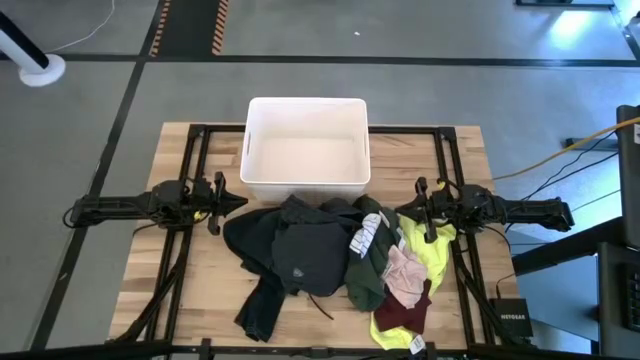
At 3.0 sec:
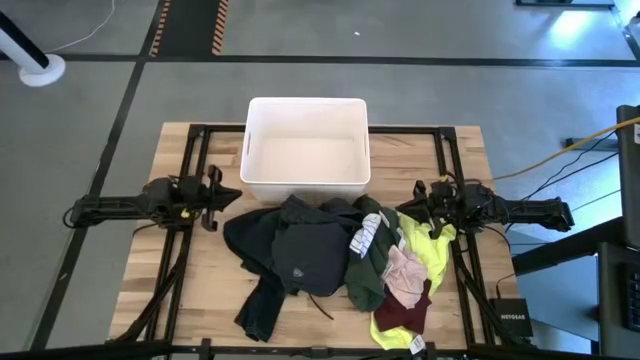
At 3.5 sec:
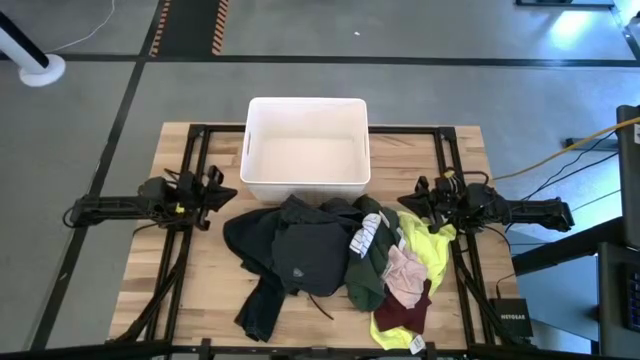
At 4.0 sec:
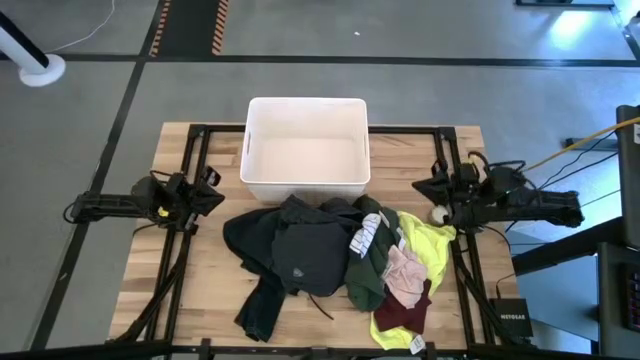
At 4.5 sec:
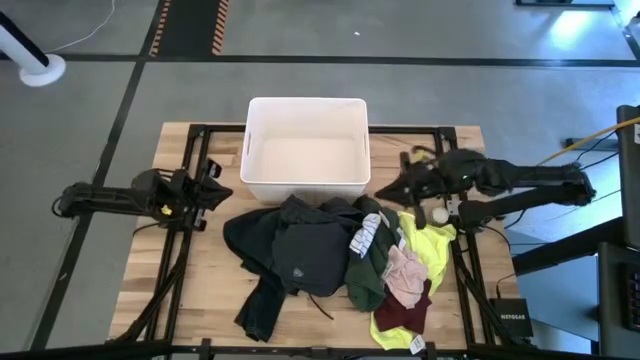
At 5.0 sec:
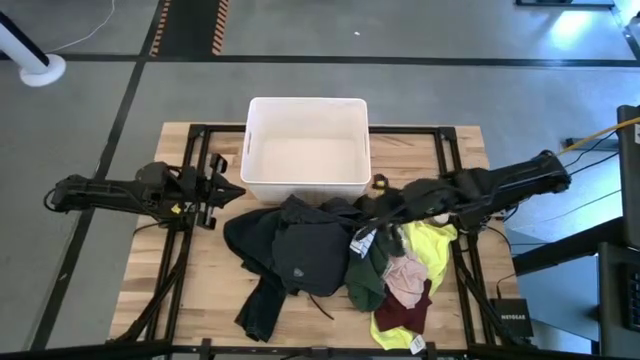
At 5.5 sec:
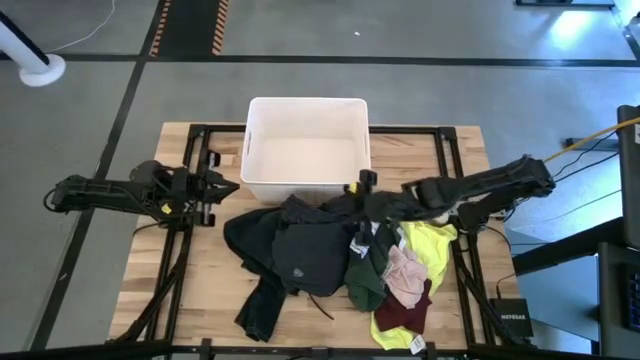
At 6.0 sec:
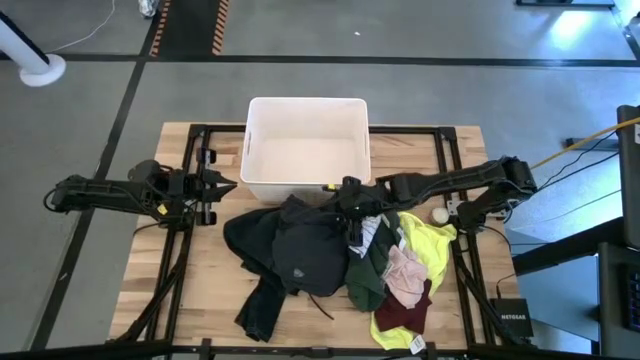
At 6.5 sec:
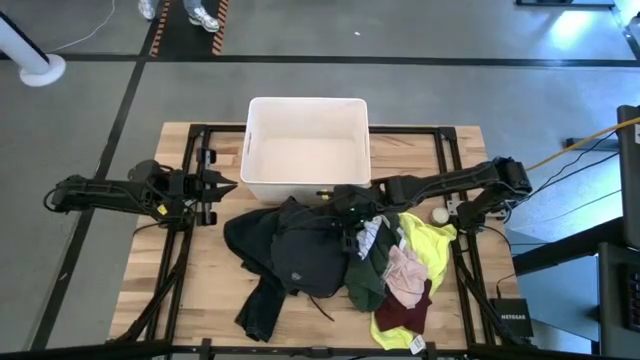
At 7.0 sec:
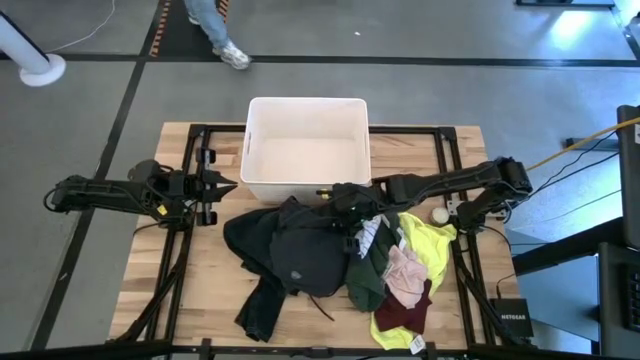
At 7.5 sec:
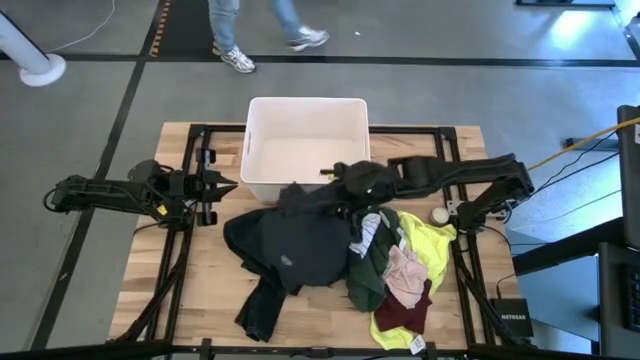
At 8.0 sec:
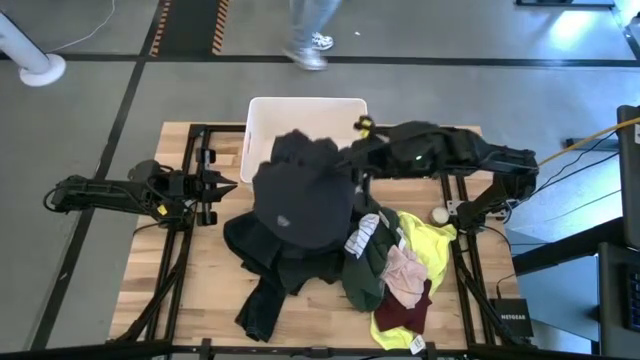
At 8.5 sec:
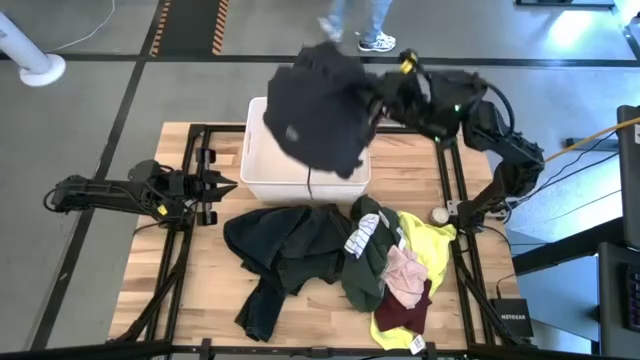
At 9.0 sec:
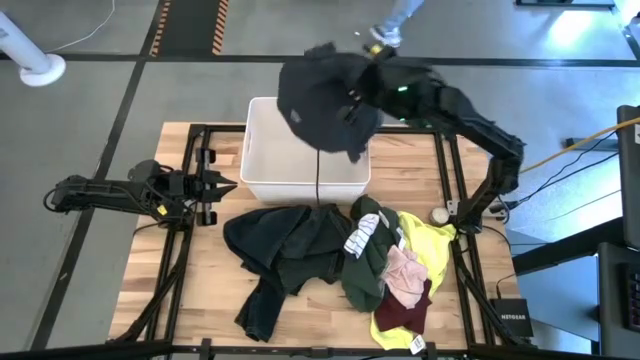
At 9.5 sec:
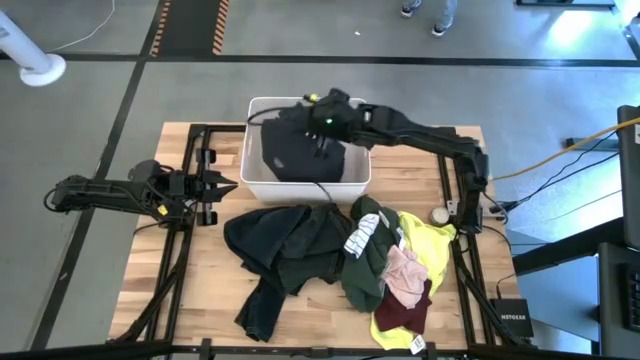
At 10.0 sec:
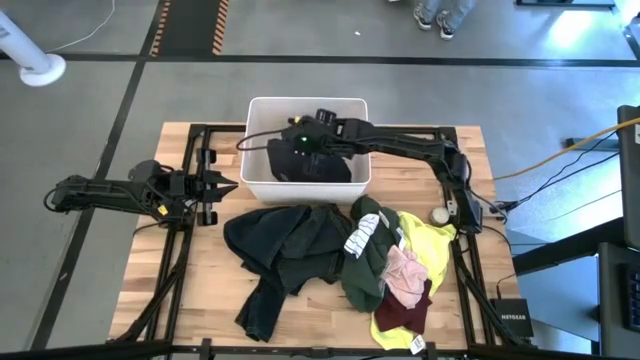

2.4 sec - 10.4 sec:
Task: Sort clothes
Put the black pants into the white laundry bin

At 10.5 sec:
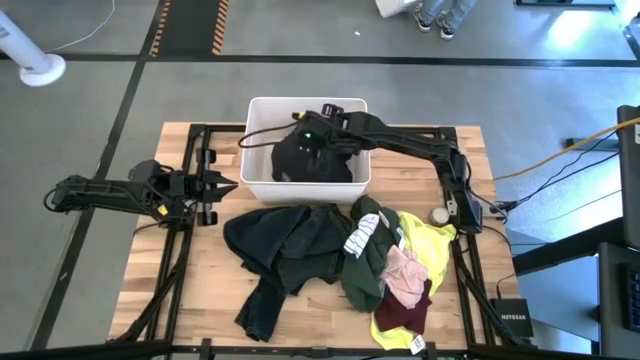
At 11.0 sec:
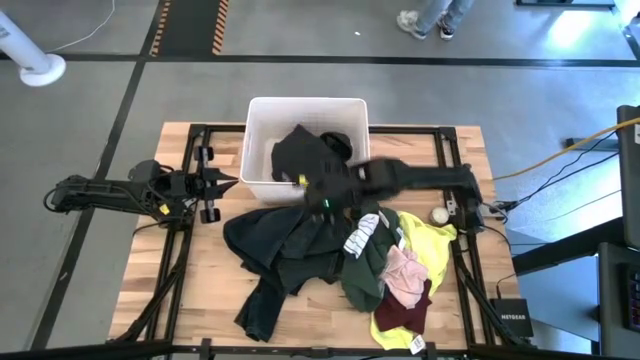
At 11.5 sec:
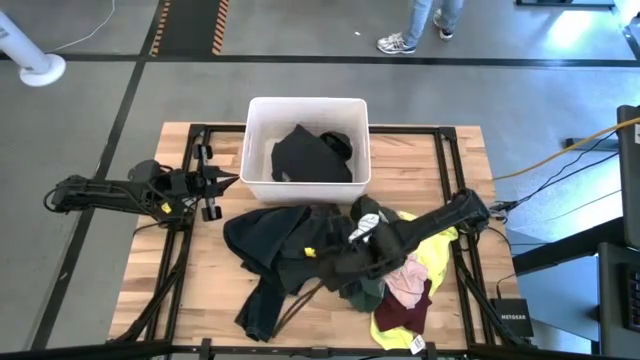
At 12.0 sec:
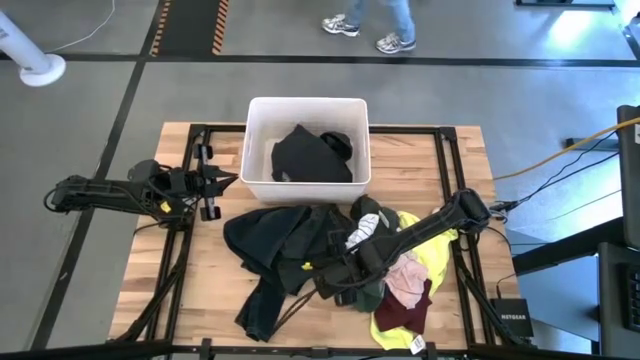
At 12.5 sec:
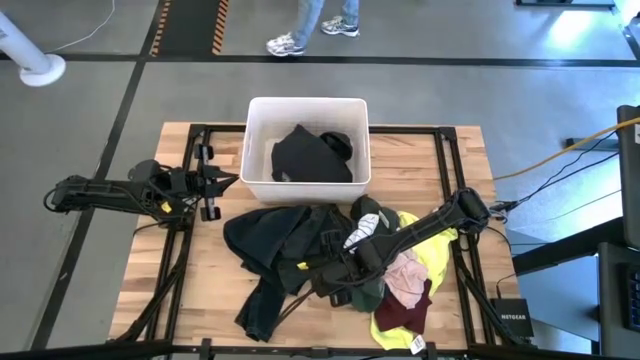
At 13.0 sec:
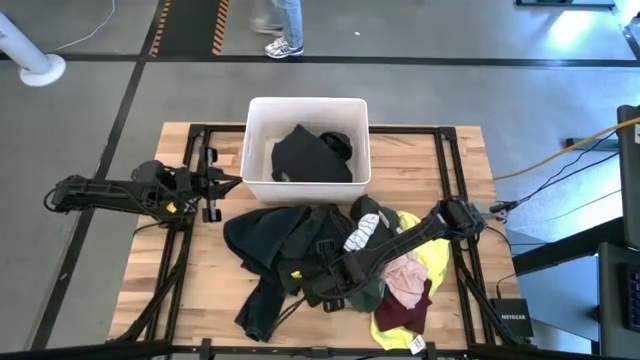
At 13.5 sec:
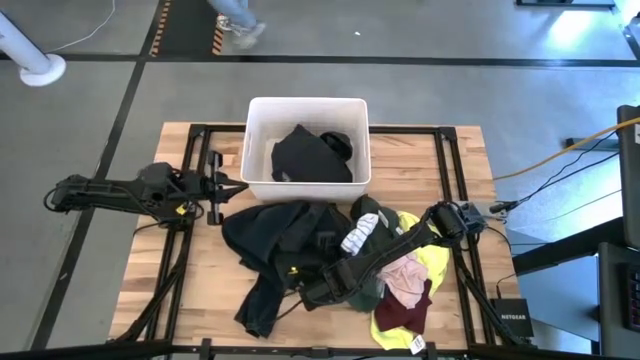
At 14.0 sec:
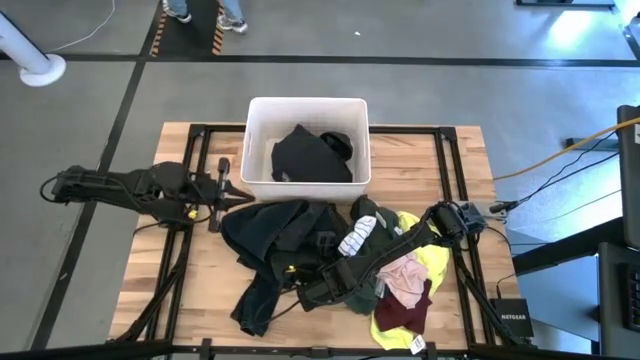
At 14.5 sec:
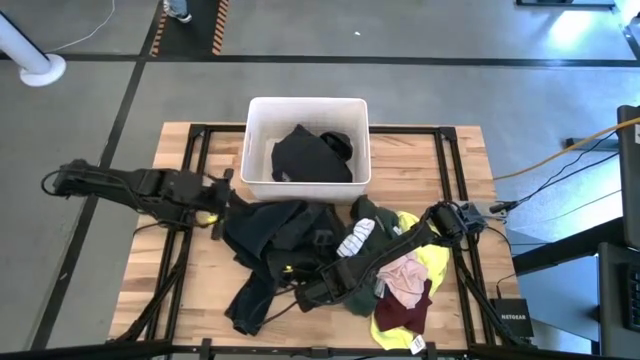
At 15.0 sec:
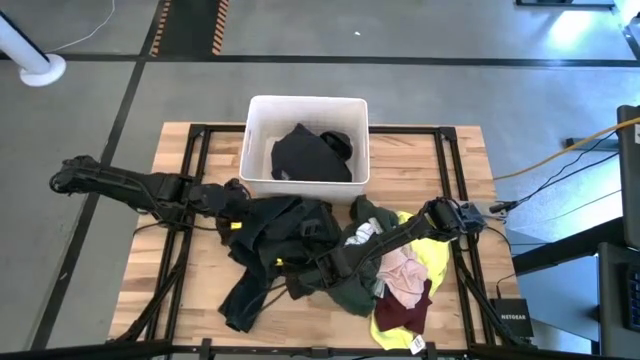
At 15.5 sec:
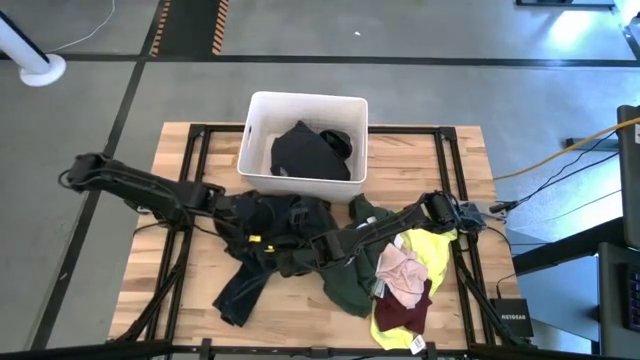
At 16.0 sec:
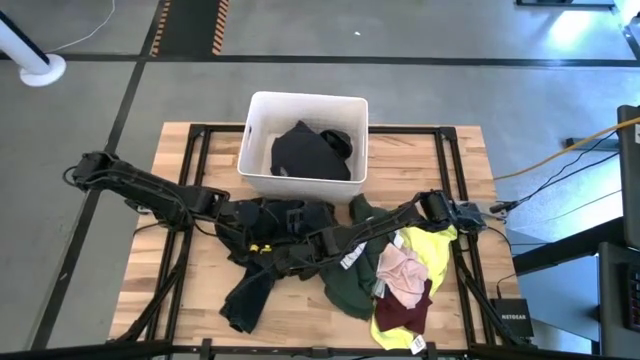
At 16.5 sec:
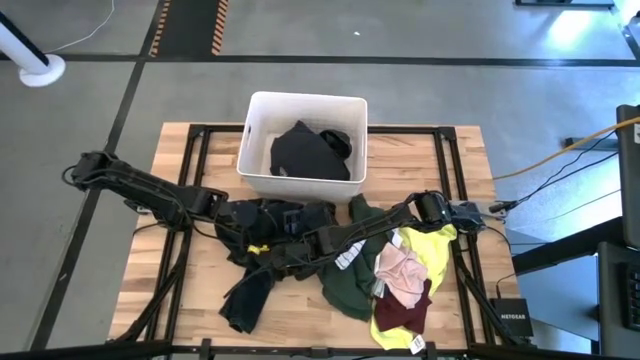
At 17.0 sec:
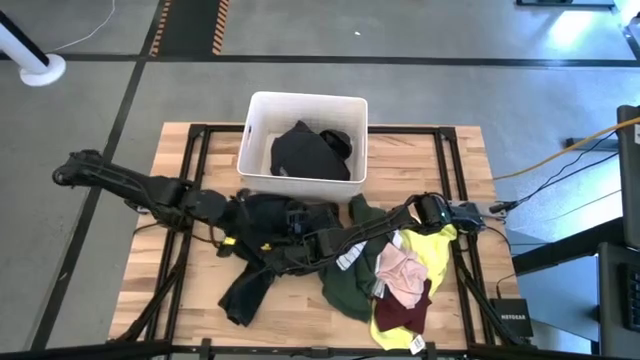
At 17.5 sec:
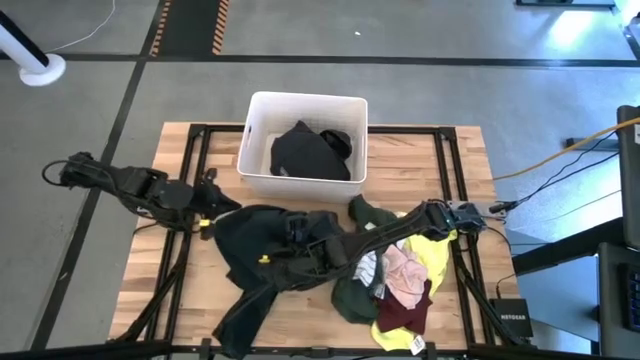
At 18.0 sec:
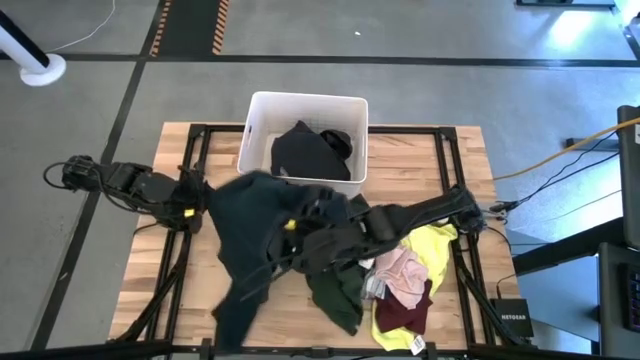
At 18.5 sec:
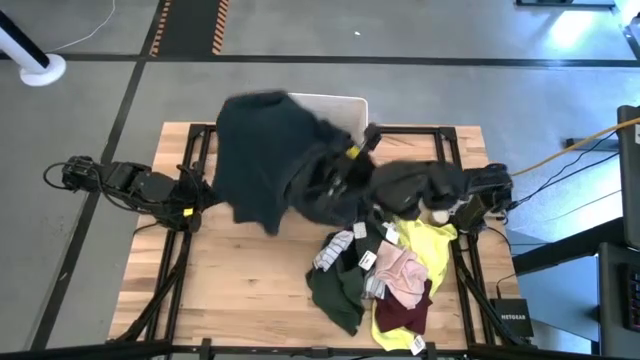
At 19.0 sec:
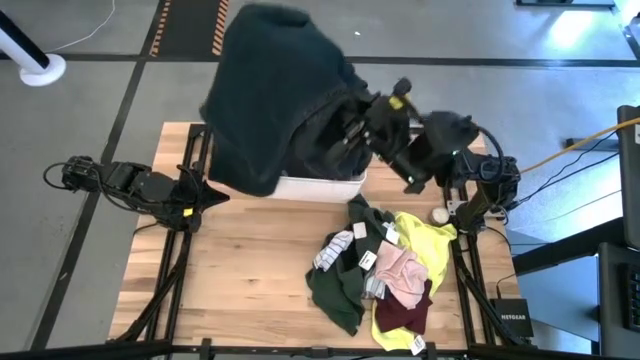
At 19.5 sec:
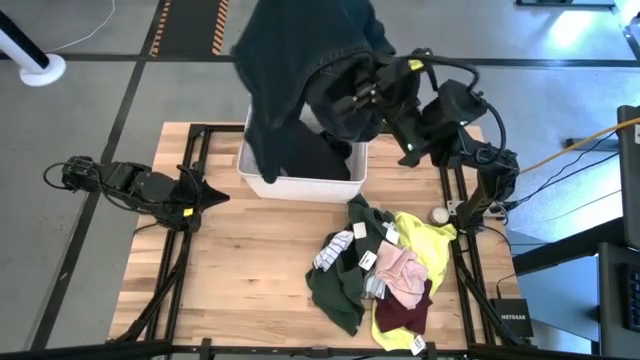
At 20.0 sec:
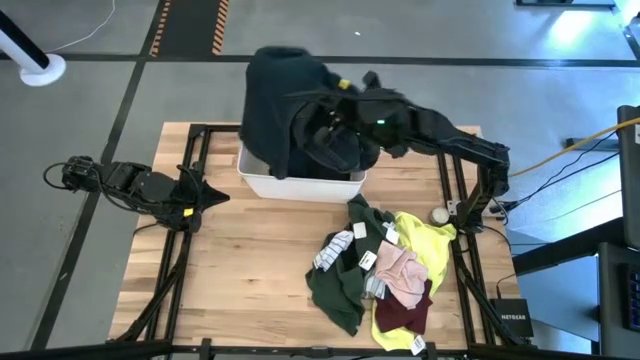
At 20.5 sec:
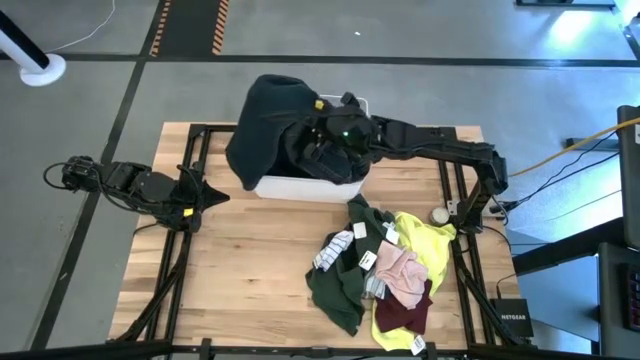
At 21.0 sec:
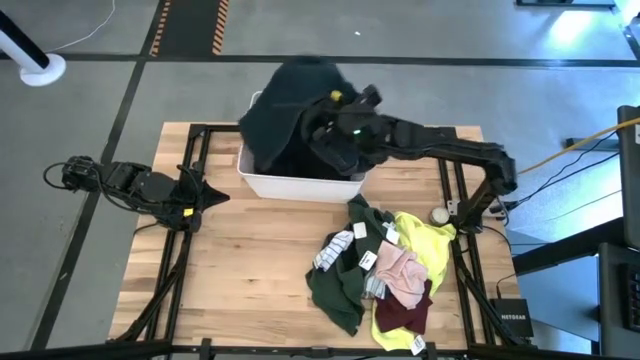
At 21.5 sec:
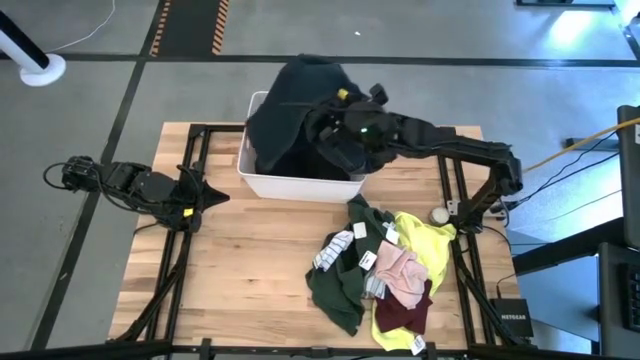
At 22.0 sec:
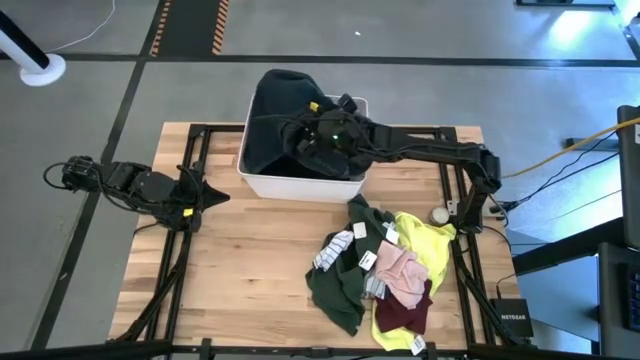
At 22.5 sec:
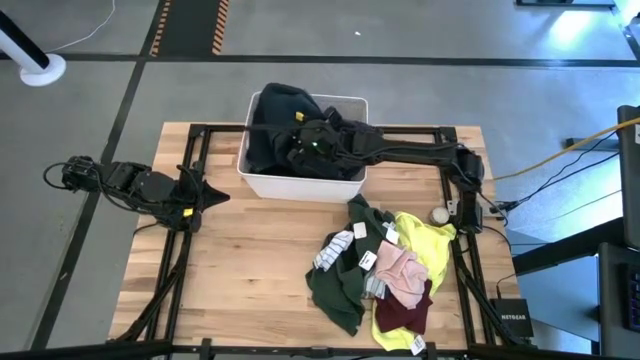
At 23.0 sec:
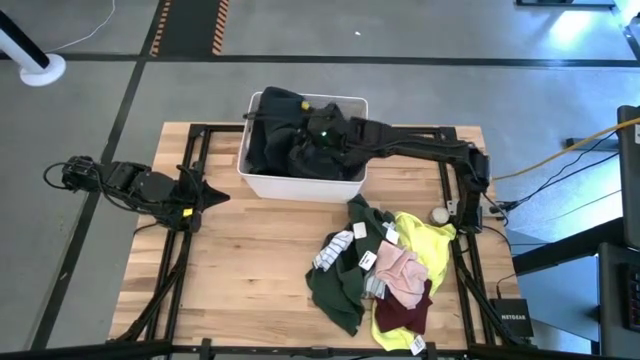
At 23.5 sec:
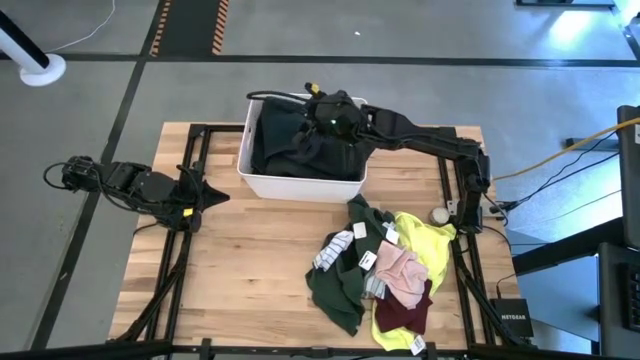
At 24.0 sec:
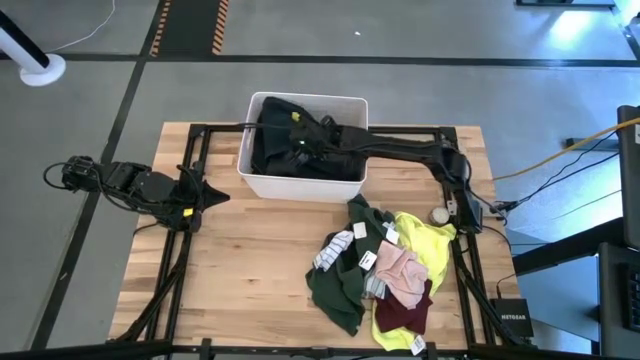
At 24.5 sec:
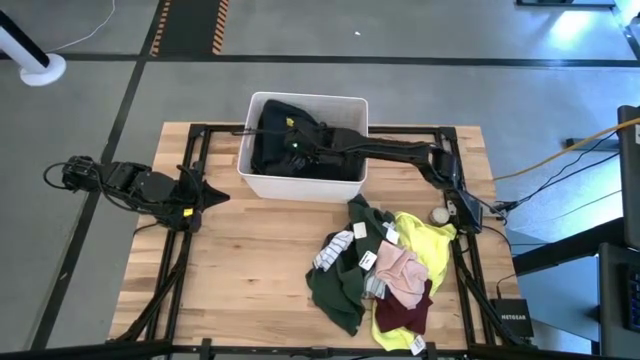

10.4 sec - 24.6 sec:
Put the dark blue jeans into the white laundry bin
